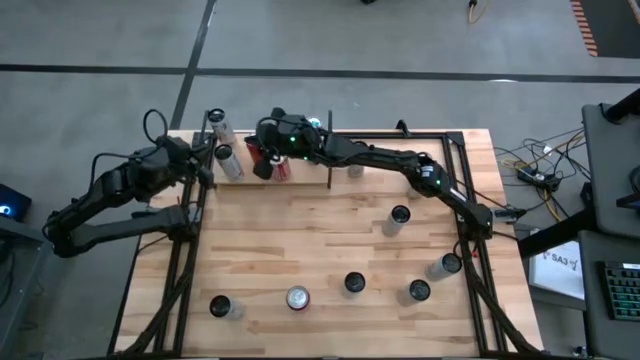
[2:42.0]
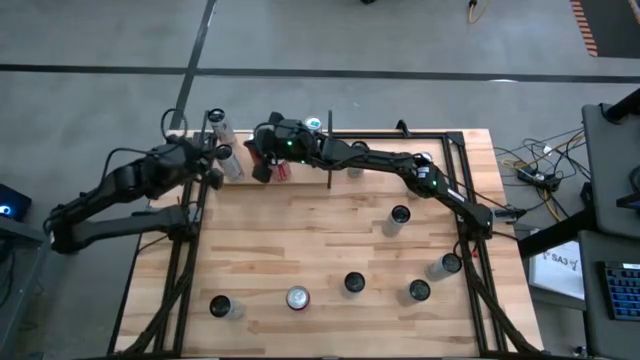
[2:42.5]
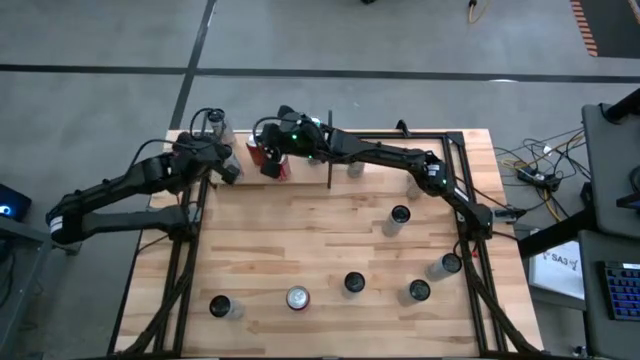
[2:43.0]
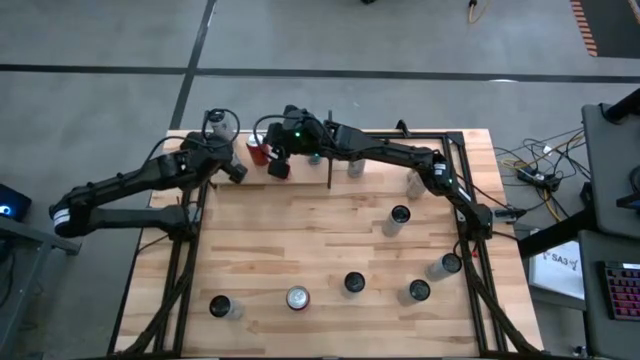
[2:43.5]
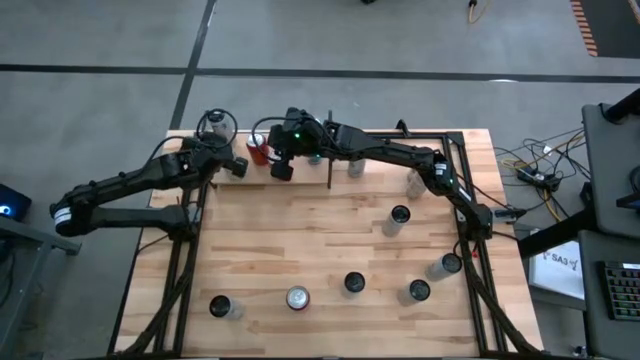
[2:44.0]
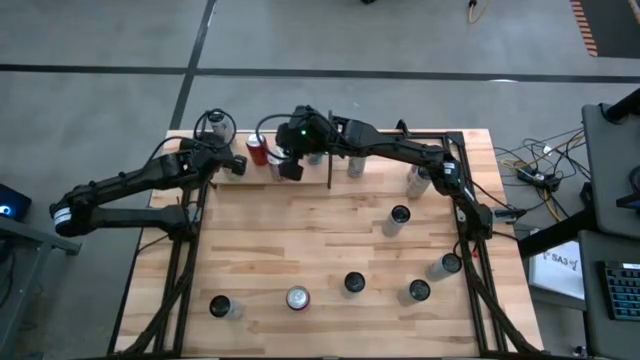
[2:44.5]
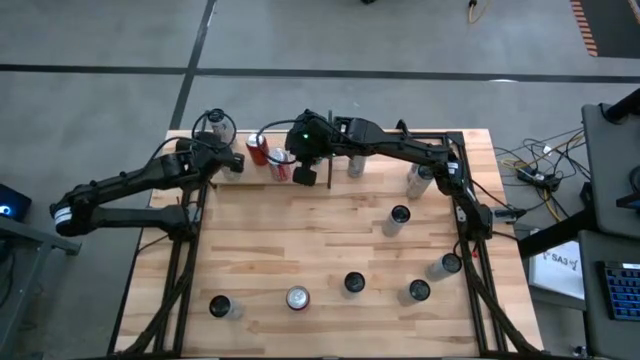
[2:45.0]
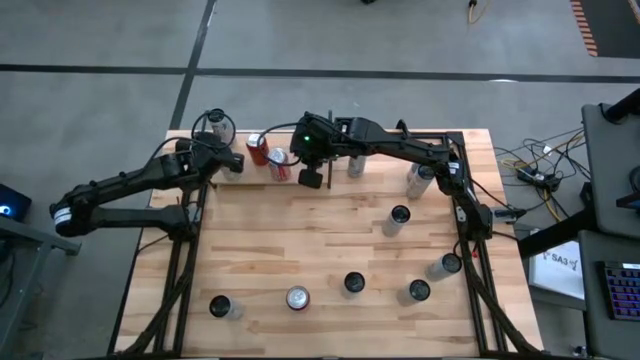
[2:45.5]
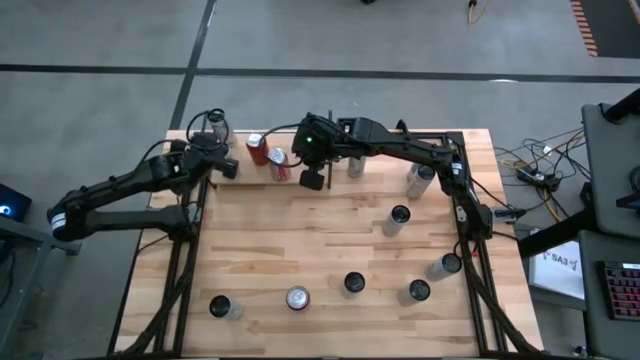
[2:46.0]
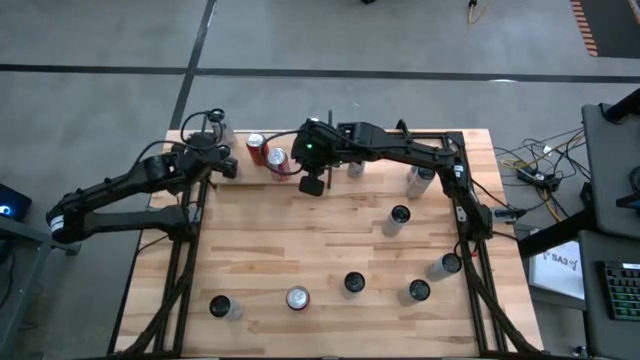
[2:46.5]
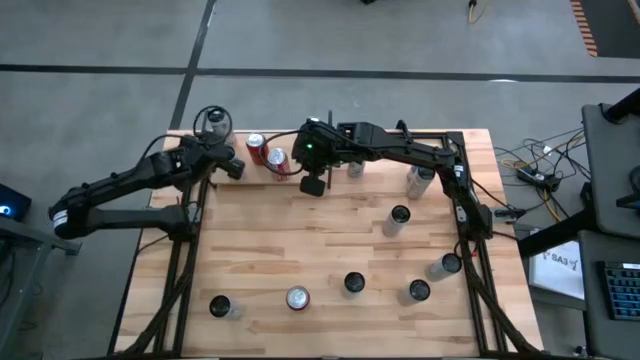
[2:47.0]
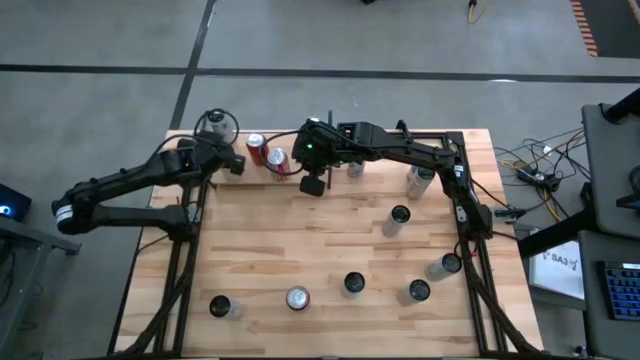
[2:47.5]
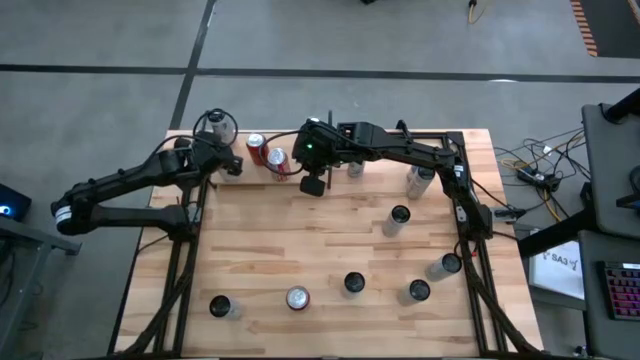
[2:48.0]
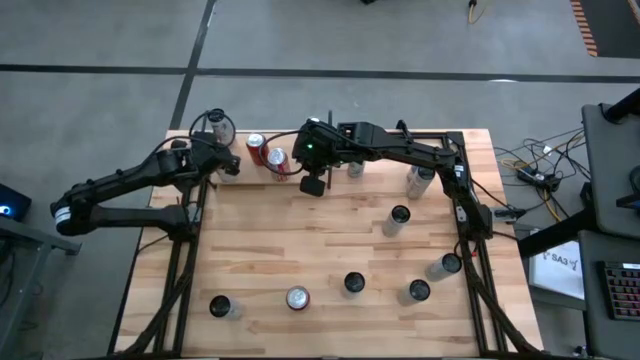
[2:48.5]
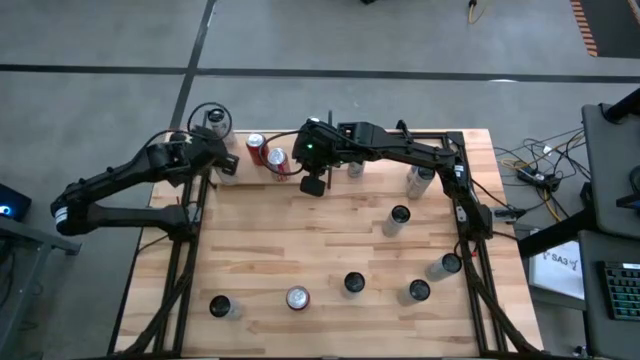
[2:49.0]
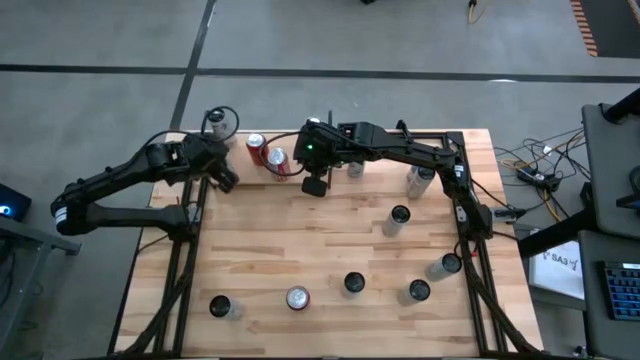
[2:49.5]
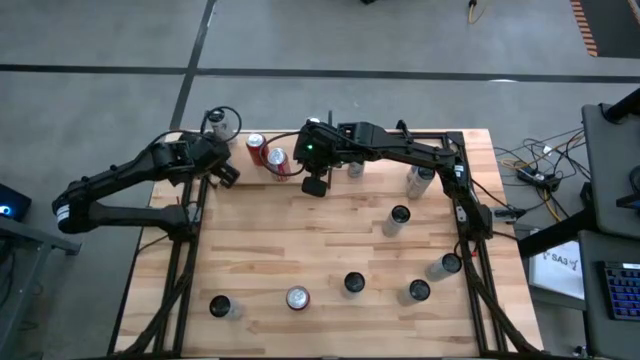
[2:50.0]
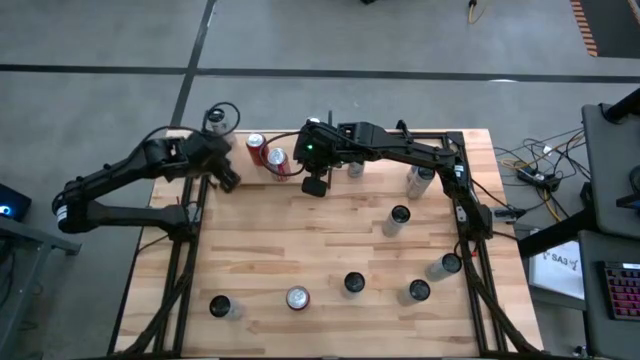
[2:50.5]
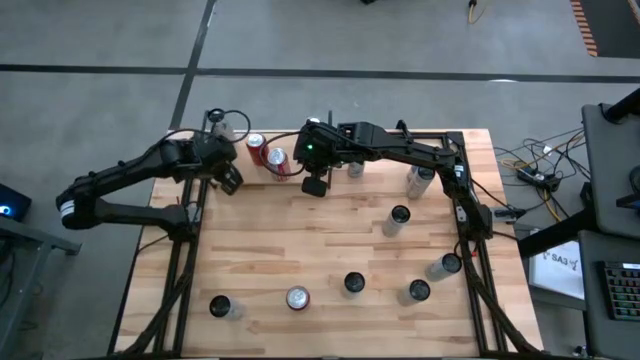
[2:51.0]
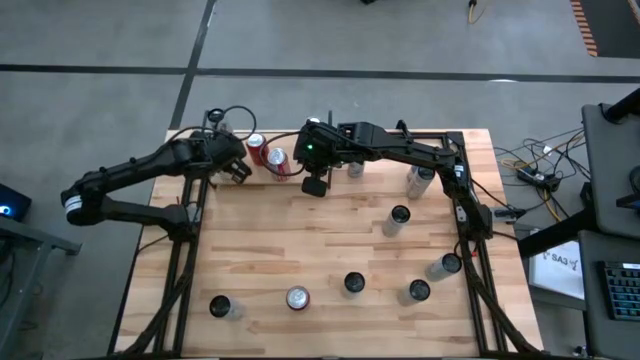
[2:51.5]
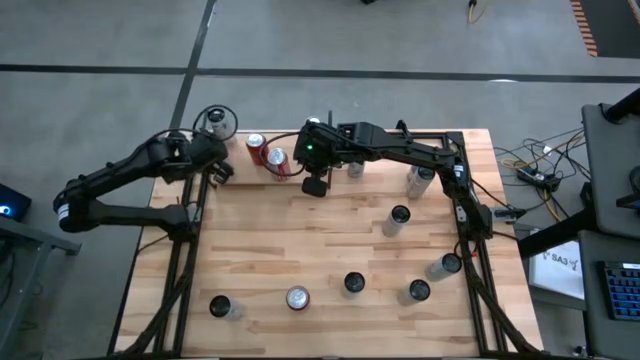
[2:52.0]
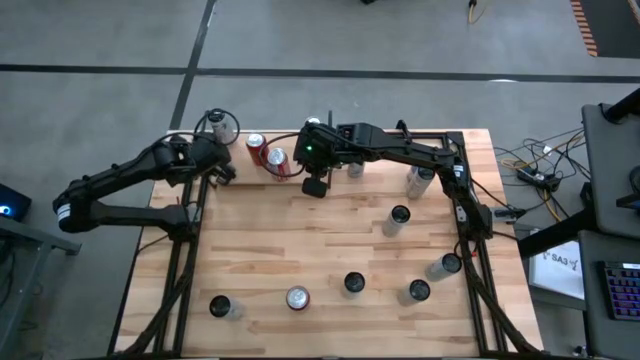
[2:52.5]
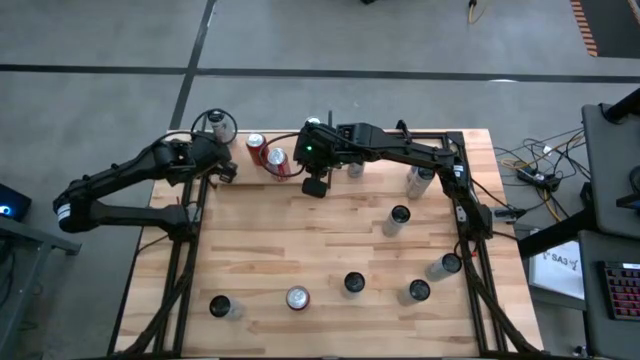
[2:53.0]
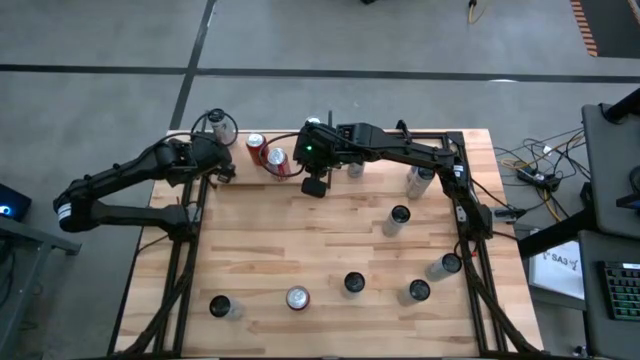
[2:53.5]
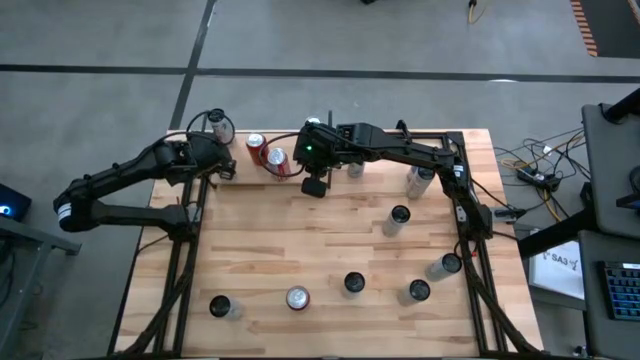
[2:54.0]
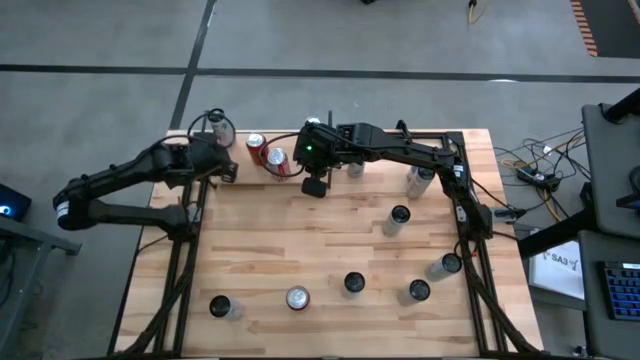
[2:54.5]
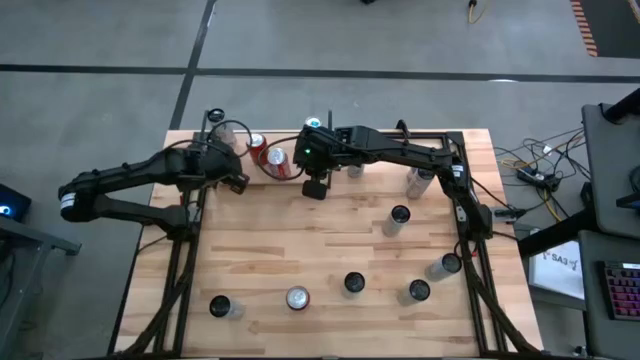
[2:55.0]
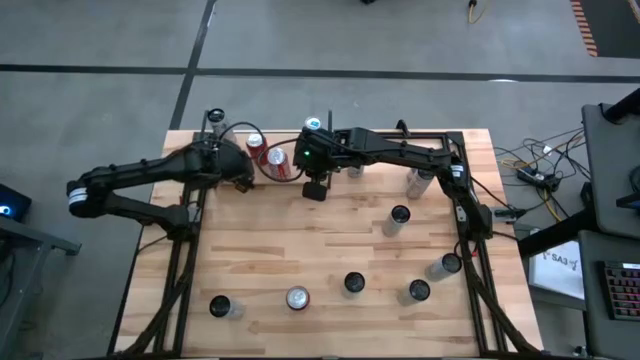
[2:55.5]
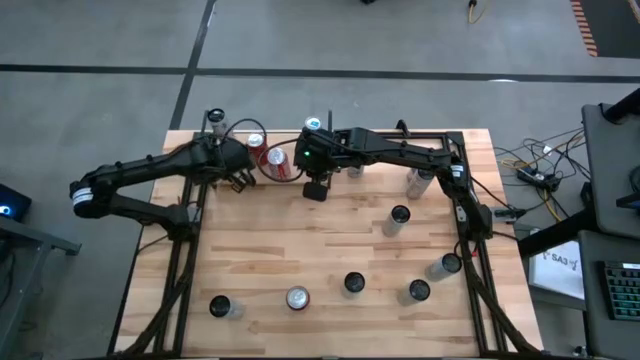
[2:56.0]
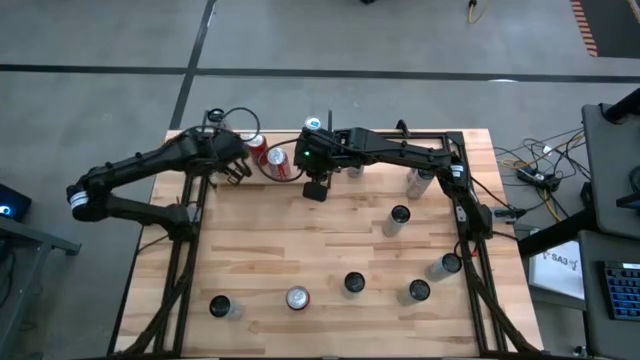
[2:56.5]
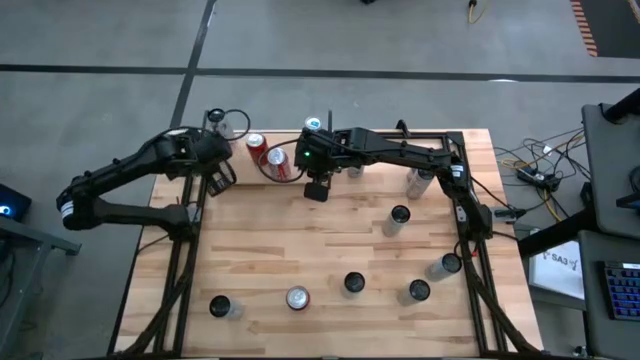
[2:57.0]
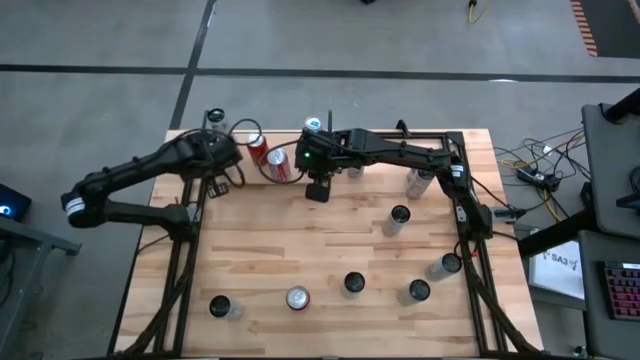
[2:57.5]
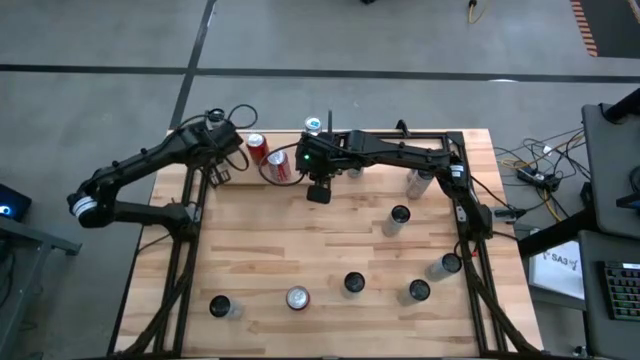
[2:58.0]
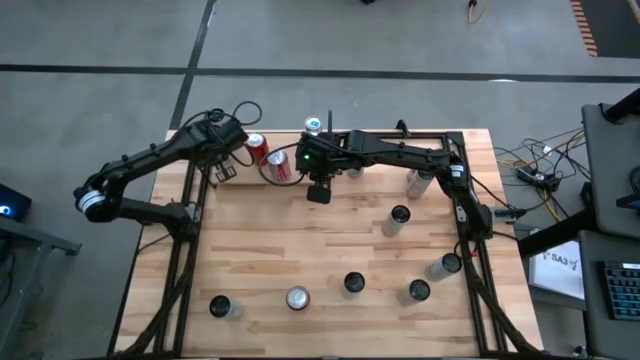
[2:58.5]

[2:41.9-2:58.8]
Task: Place canned beverage on shelf
Put the top white and pink soda can on the shelf aligned with the other white and pink soda can

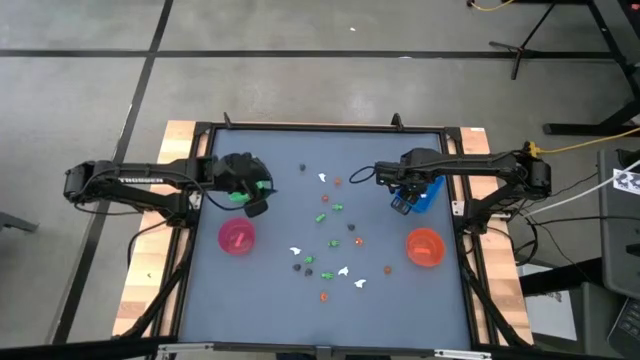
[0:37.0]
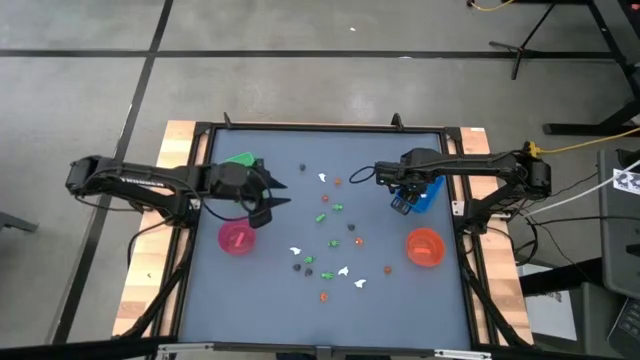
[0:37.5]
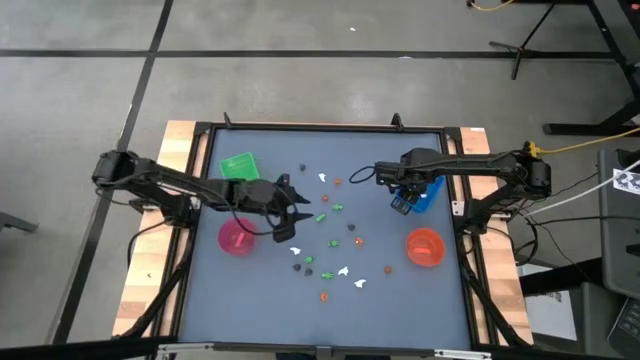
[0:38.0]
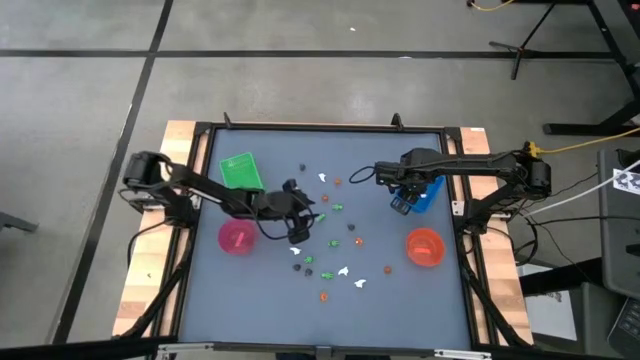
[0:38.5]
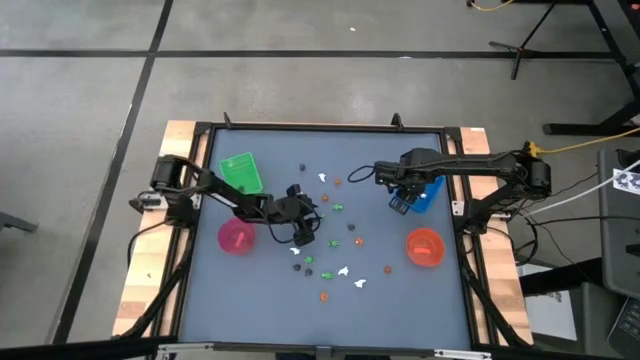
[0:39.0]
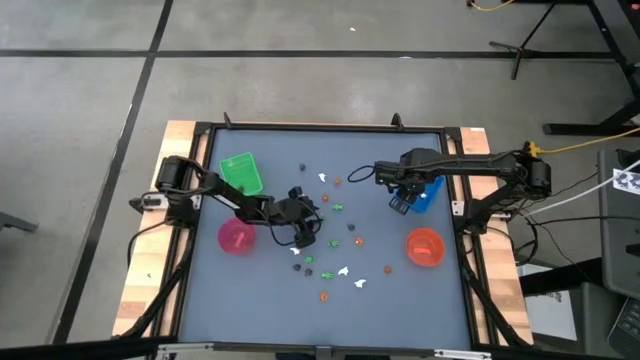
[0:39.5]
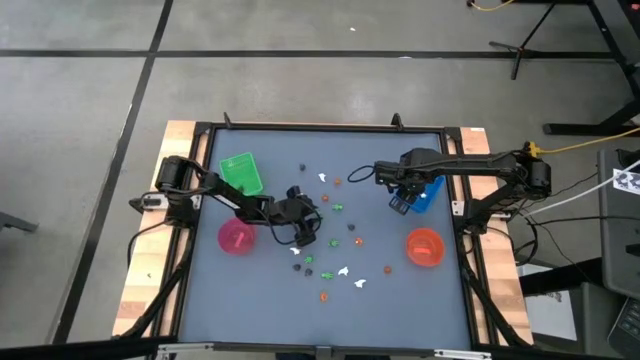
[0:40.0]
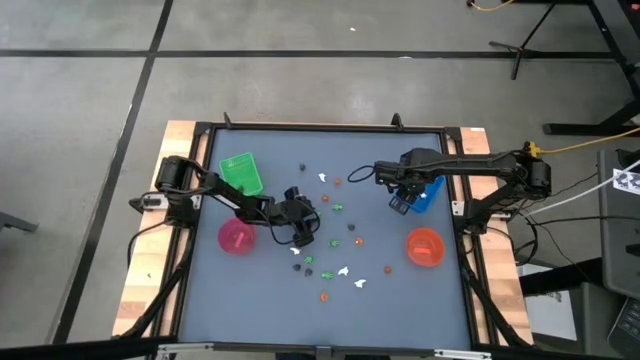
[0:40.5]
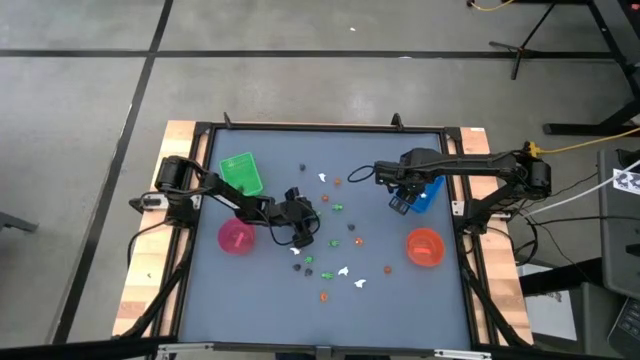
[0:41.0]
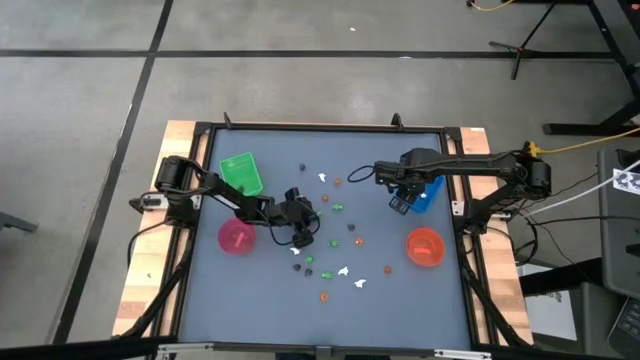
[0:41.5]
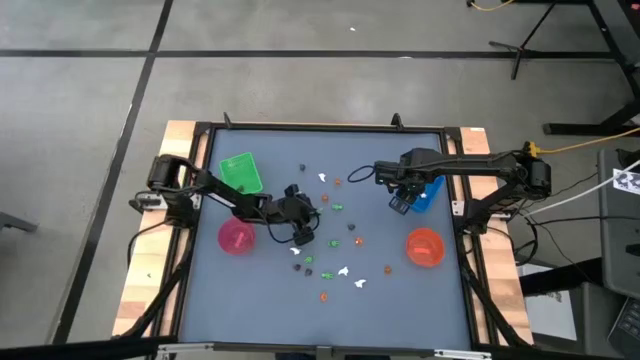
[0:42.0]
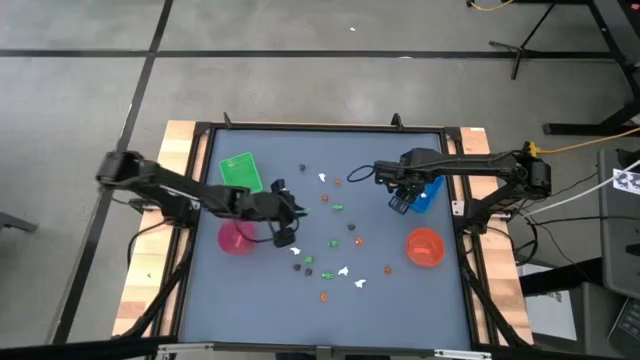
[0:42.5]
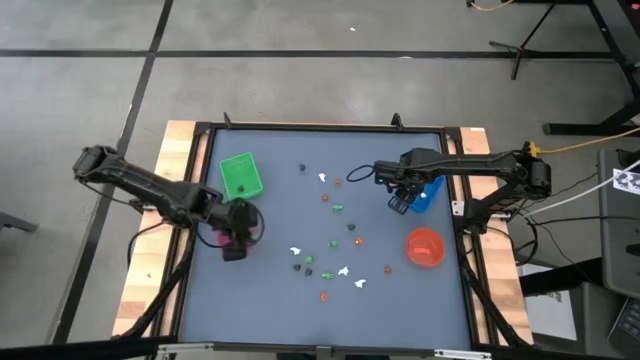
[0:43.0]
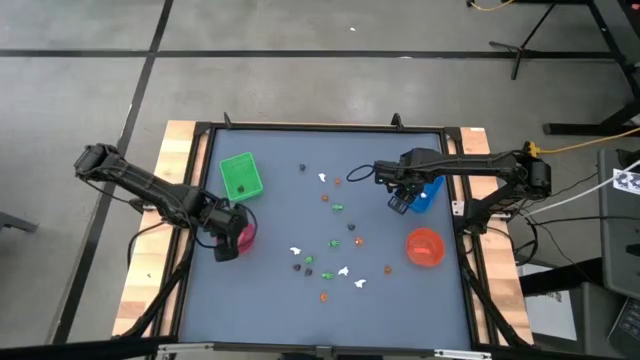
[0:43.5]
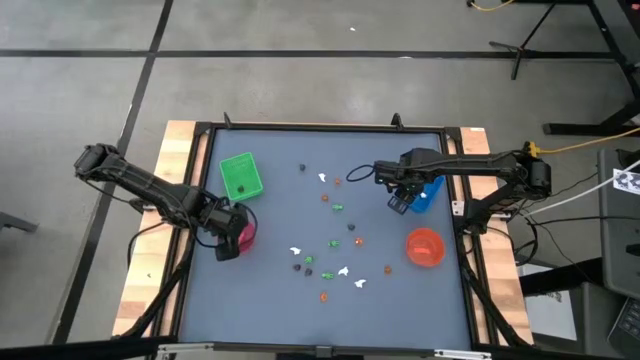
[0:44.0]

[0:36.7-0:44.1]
Task: Sort Halloween decoration
Put the small green skeleton toy into the transparent red bowl
